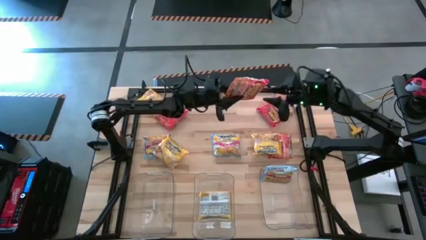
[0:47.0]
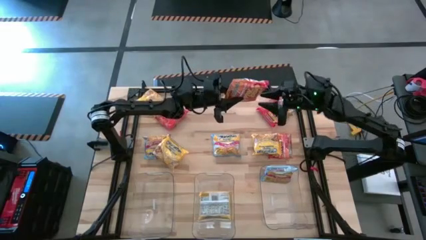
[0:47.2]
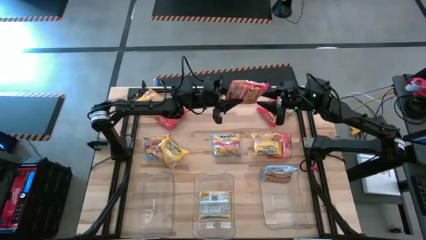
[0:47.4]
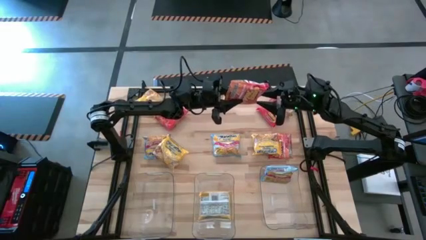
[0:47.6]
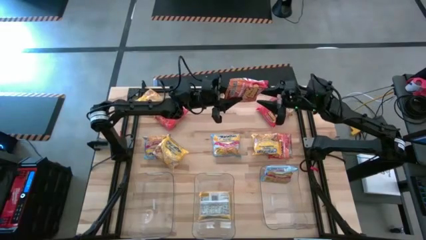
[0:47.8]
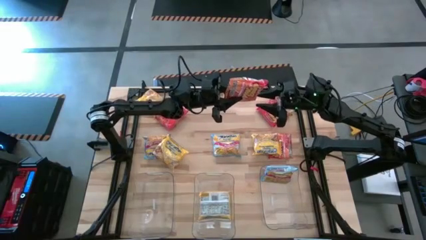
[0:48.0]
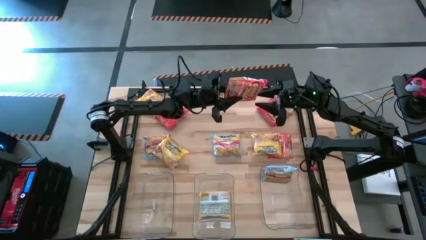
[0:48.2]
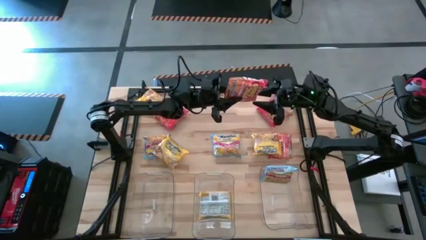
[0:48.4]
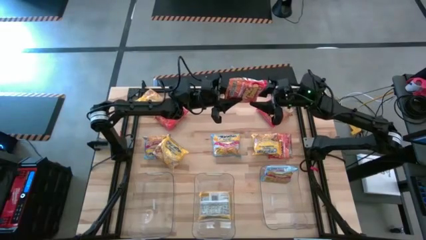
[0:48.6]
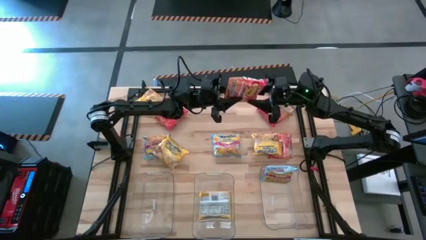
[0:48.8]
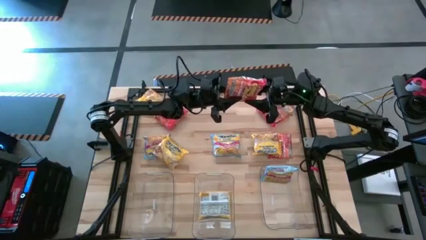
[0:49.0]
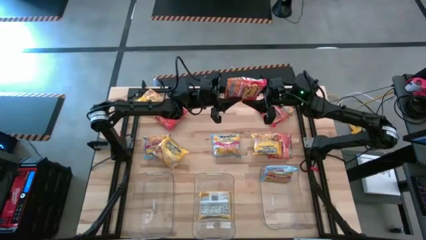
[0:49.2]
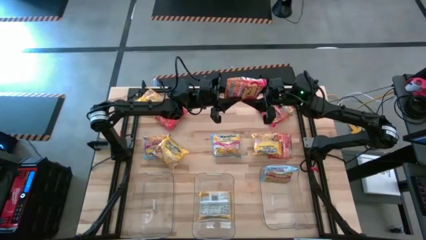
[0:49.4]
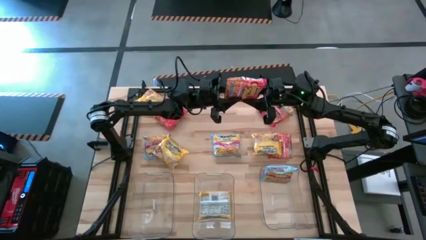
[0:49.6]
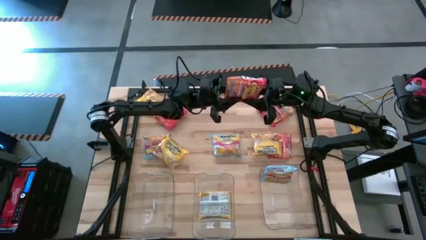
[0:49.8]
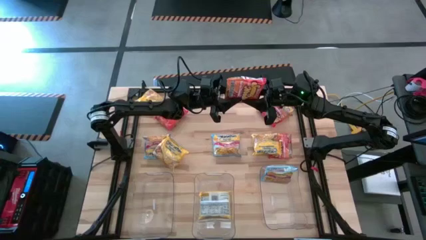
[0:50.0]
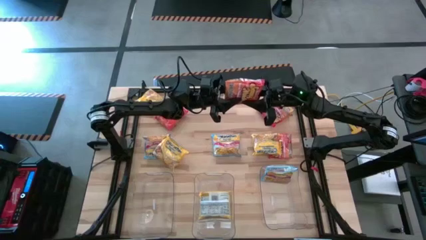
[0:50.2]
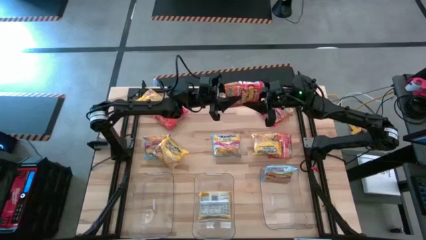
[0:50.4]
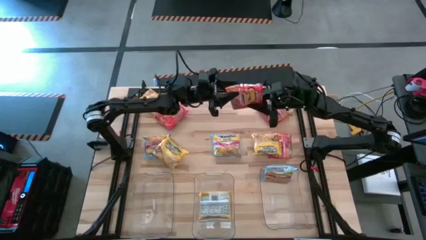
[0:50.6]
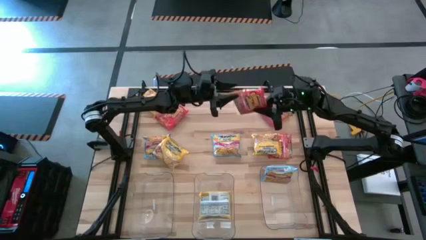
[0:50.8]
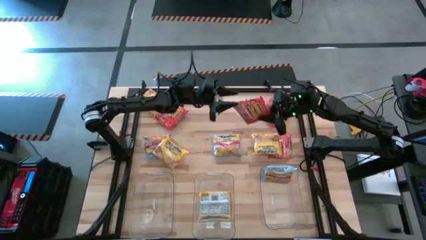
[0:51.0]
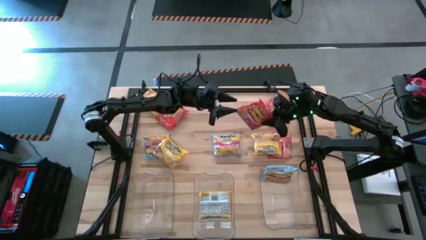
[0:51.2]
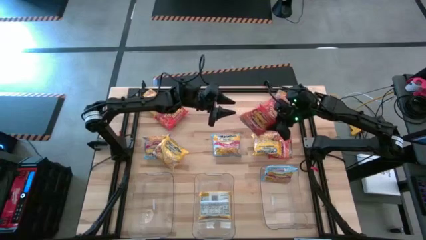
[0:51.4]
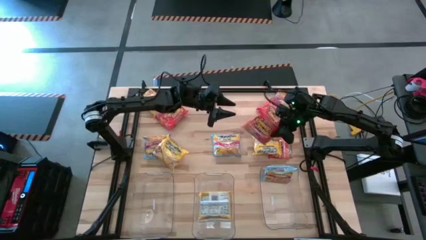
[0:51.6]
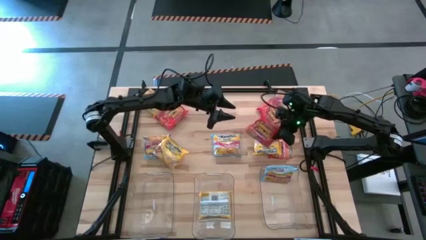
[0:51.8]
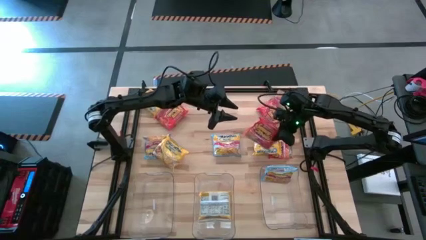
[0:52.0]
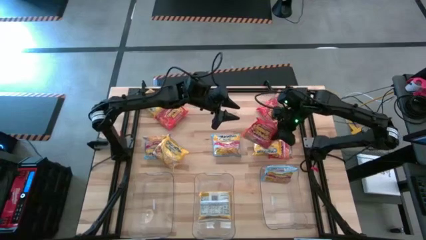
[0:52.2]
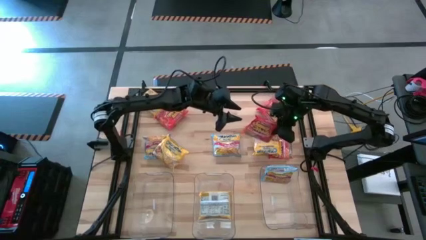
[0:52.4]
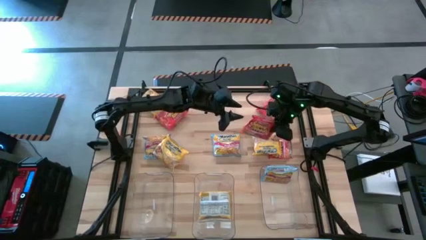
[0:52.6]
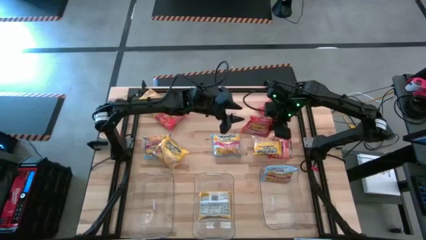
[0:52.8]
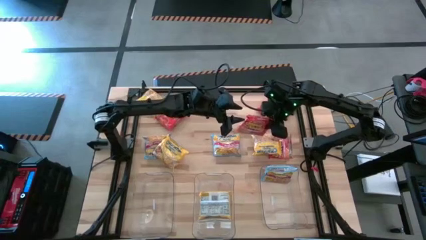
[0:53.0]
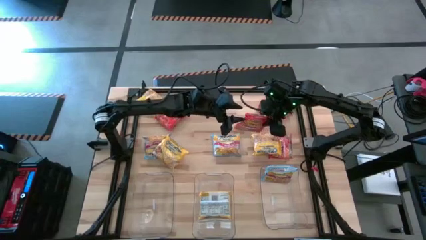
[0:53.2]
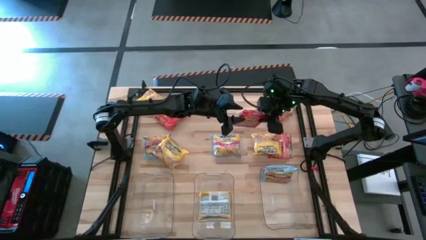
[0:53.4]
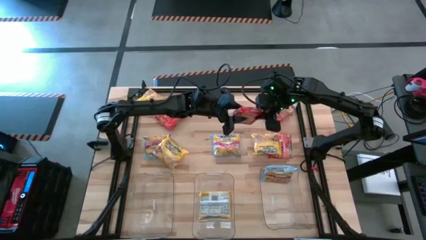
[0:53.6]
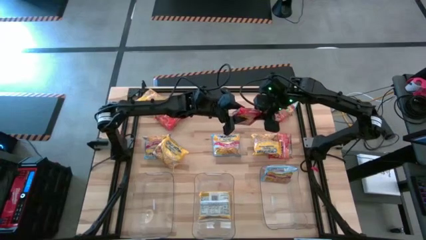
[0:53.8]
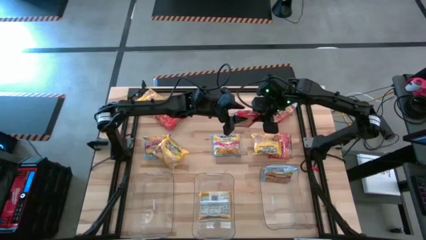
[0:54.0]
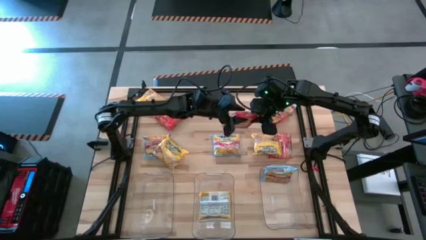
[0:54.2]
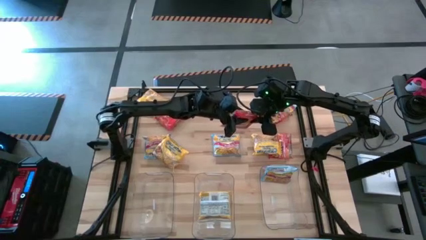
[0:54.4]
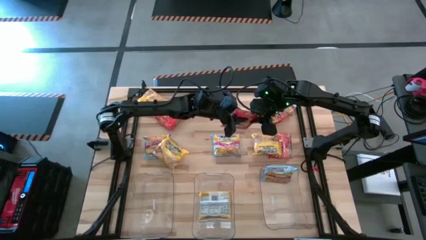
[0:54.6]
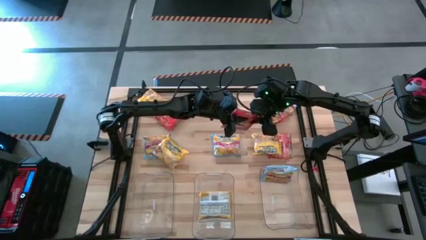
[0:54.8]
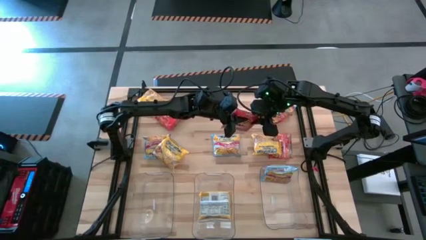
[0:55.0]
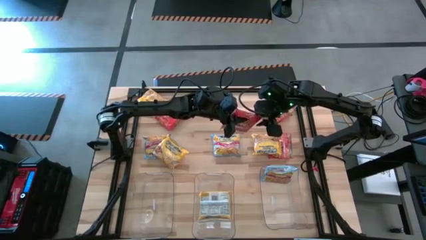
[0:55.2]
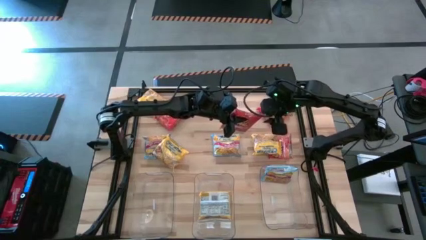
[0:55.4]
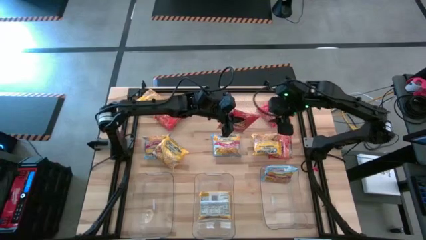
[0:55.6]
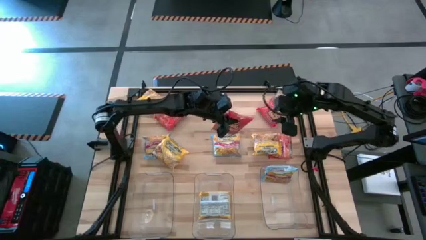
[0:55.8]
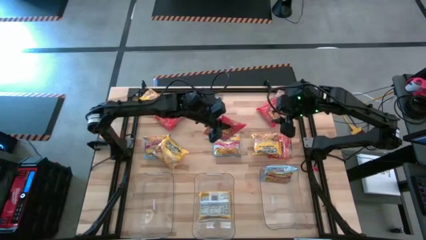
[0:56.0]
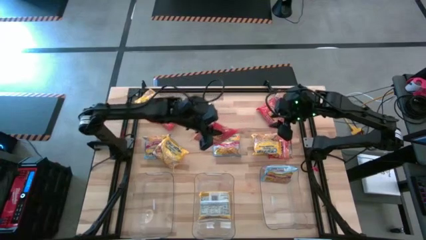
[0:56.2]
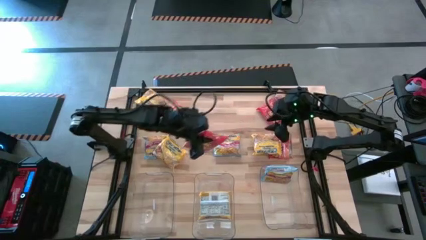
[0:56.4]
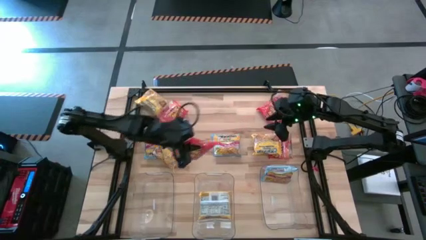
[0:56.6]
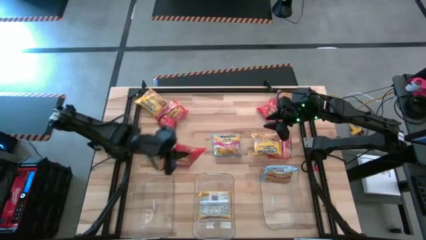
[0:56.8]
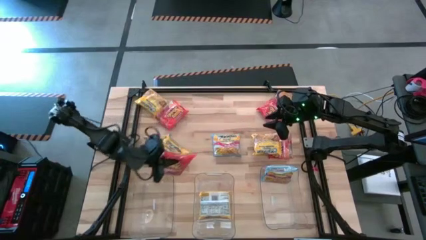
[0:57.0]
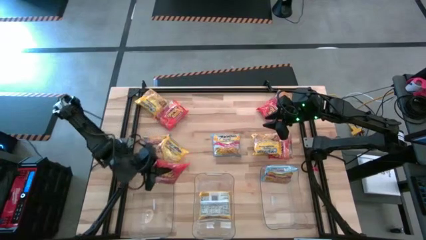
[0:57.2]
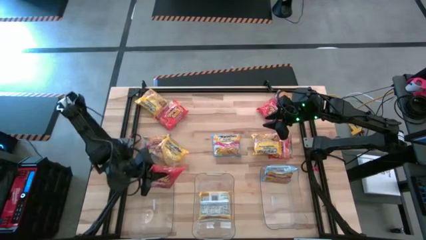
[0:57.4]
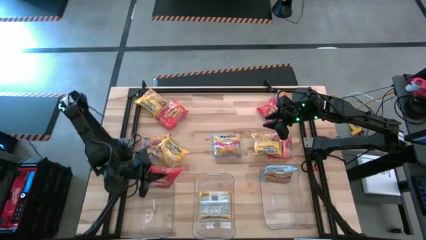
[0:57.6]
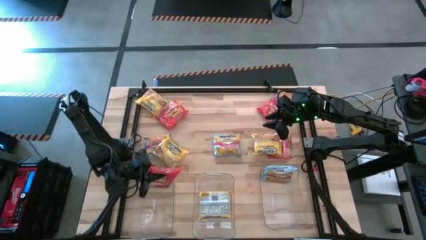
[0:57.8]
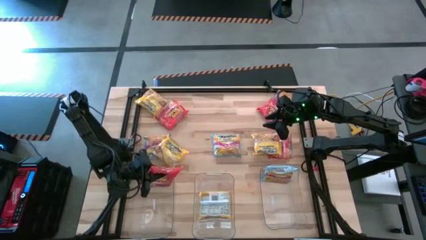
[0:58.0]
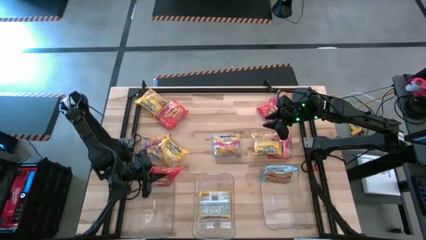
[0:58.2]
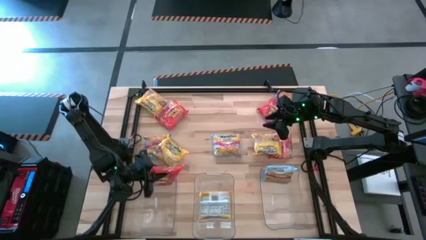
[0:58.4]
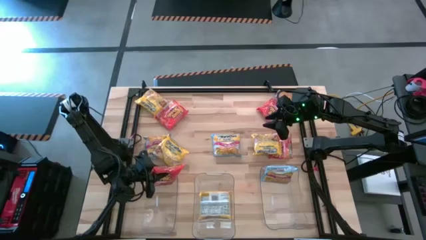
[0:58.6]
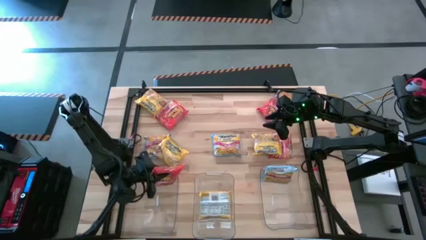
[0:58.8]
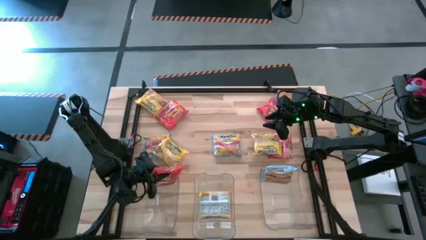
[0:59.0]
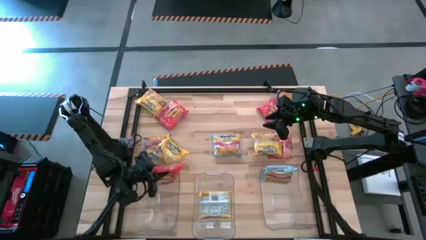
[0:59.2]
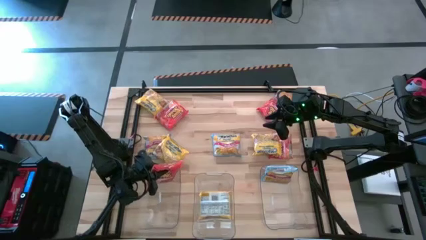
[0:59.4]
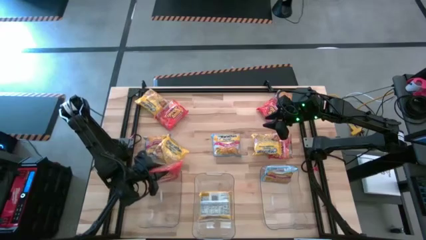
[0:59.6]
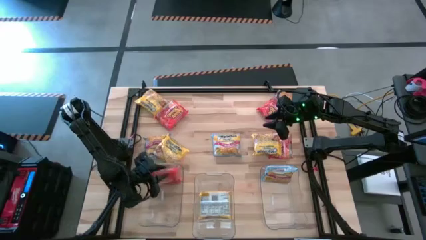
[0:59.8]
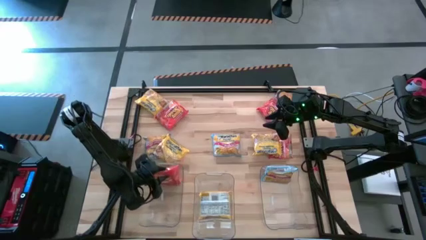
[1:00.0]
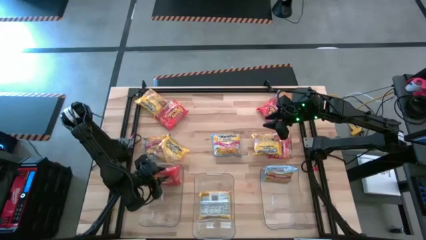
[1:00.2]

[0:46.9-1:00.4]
Task: Sort Maruchan noodles
Put the orange noodle pack into the left transparent bin
